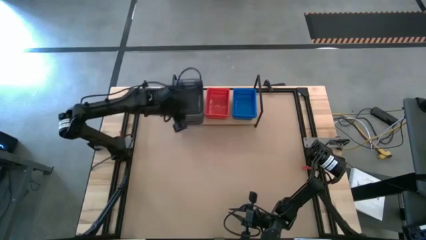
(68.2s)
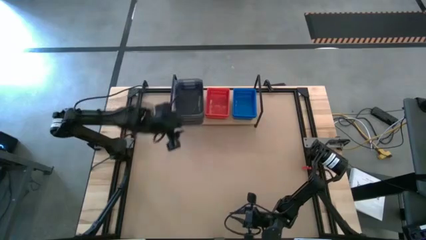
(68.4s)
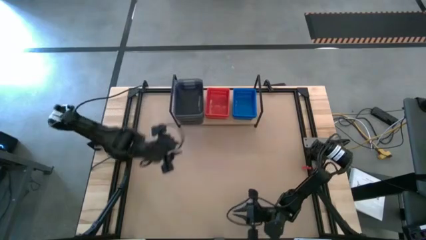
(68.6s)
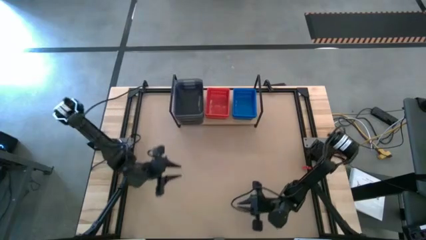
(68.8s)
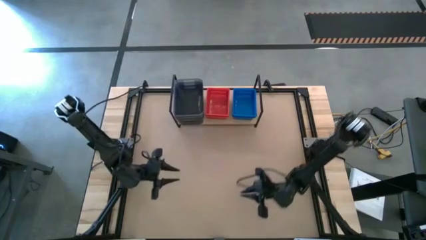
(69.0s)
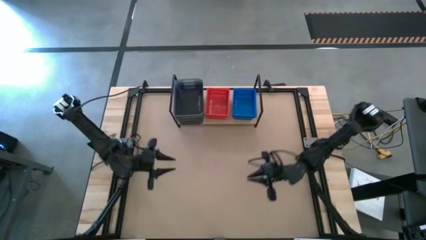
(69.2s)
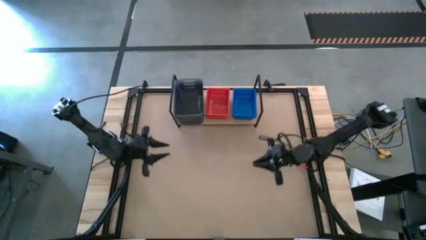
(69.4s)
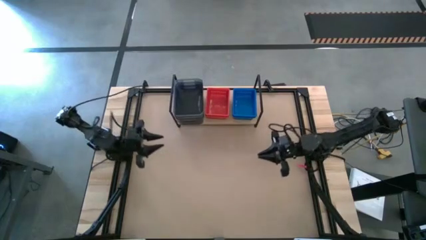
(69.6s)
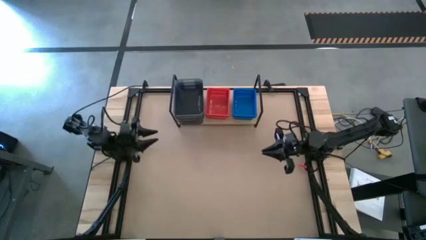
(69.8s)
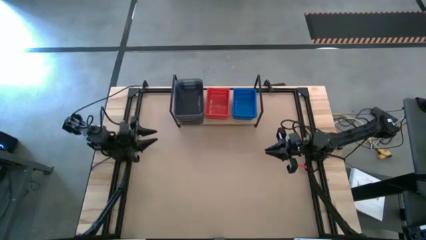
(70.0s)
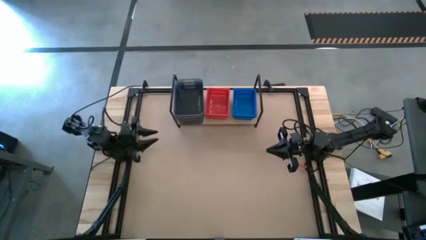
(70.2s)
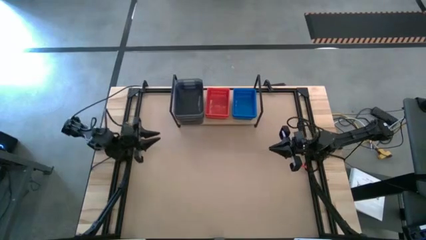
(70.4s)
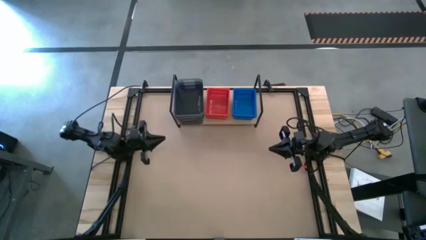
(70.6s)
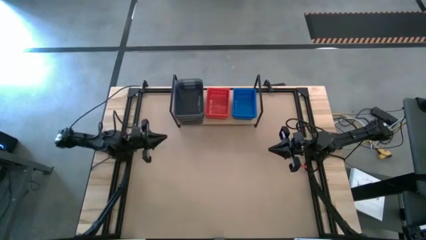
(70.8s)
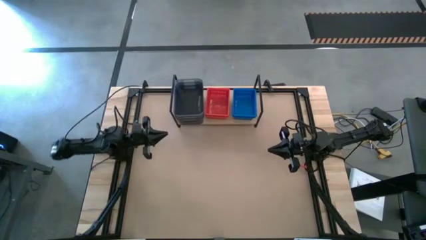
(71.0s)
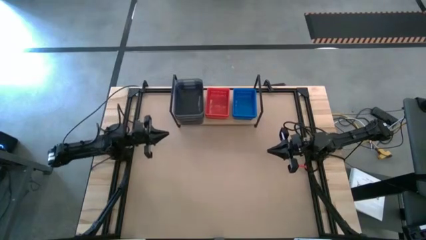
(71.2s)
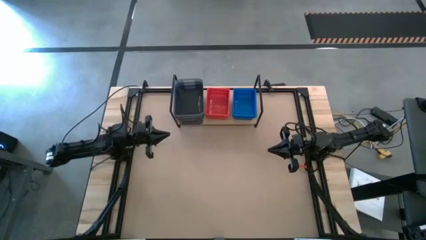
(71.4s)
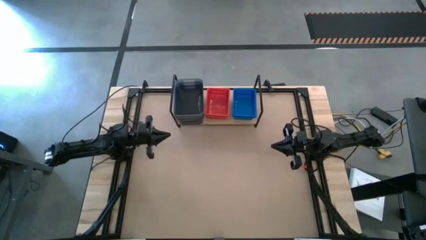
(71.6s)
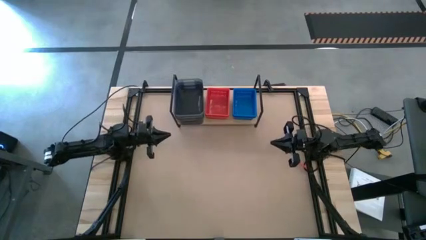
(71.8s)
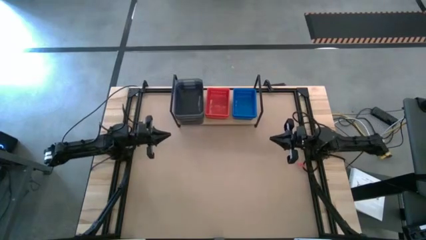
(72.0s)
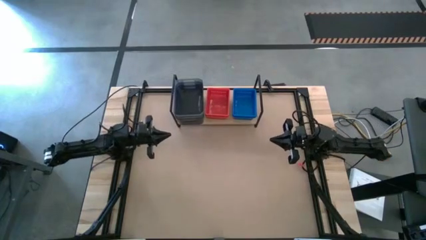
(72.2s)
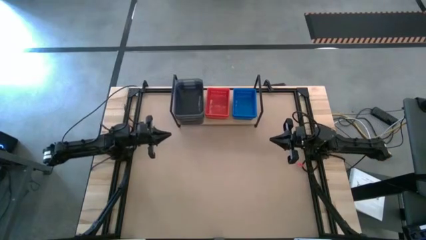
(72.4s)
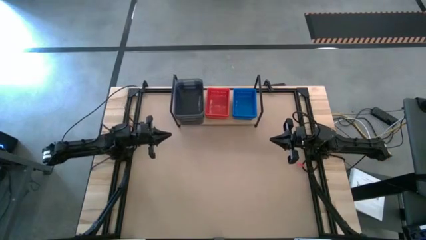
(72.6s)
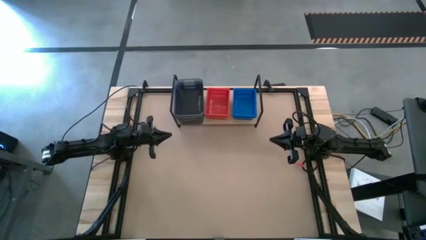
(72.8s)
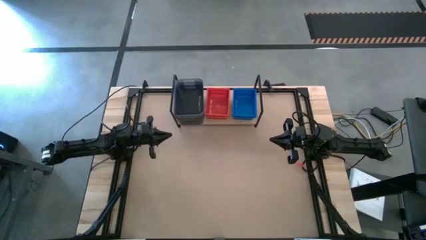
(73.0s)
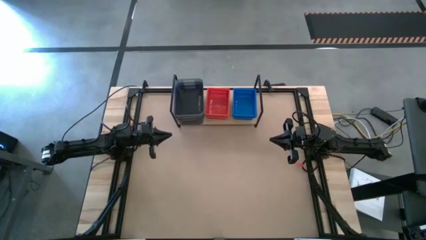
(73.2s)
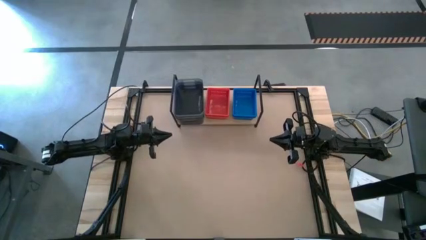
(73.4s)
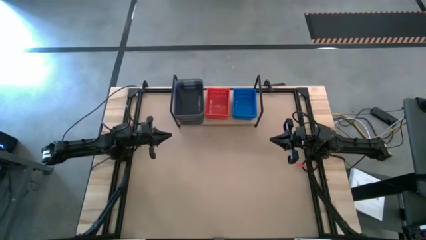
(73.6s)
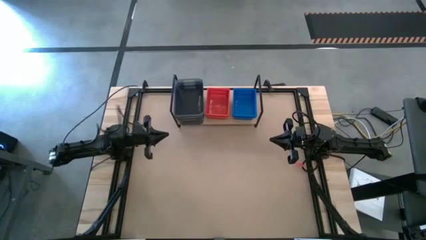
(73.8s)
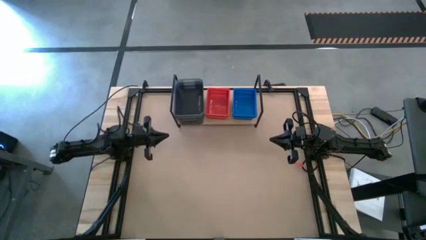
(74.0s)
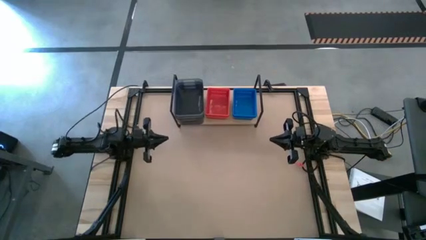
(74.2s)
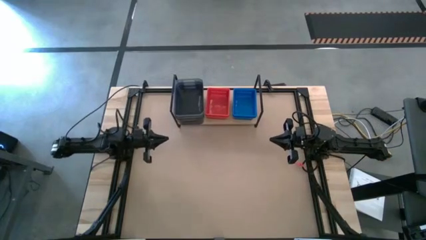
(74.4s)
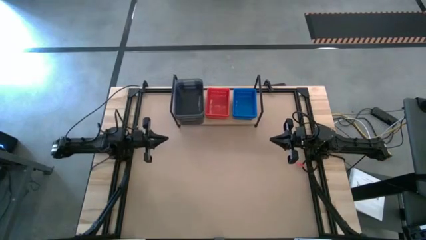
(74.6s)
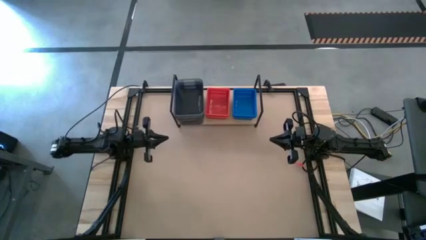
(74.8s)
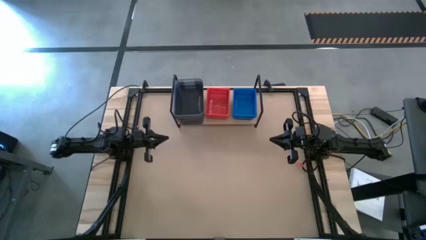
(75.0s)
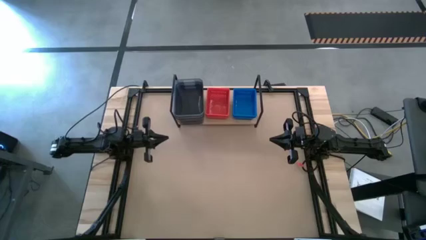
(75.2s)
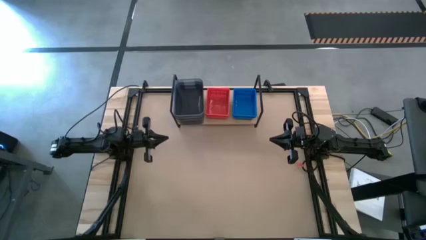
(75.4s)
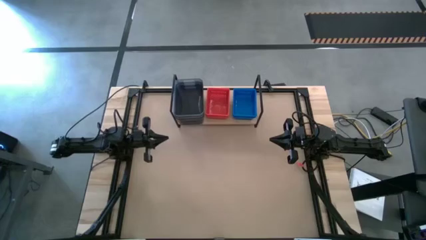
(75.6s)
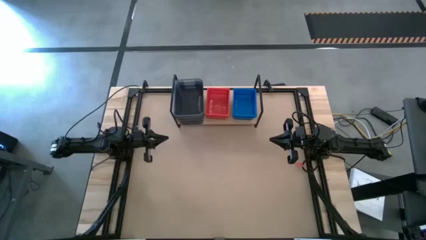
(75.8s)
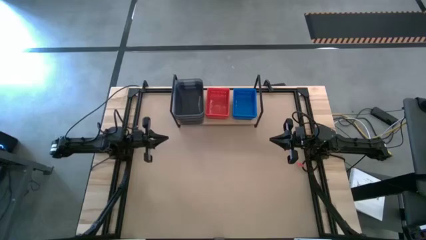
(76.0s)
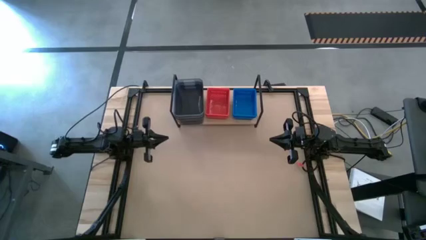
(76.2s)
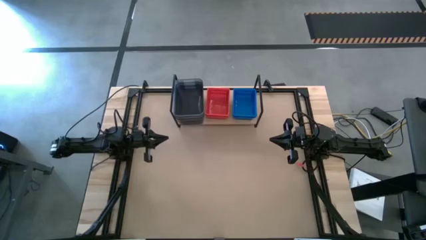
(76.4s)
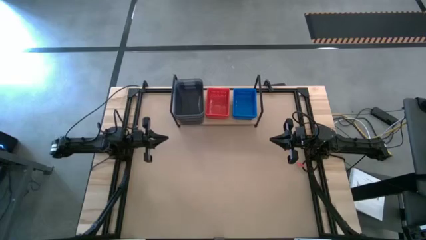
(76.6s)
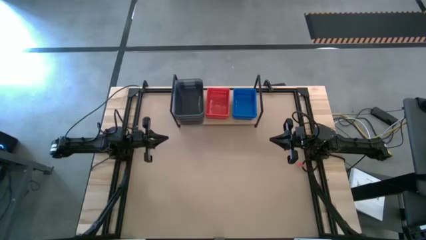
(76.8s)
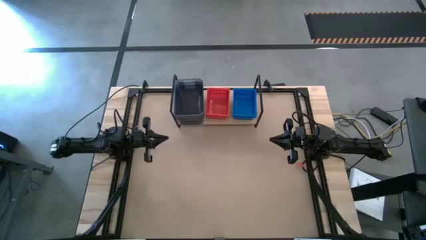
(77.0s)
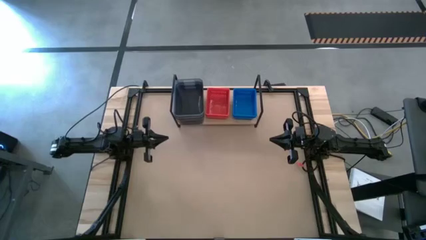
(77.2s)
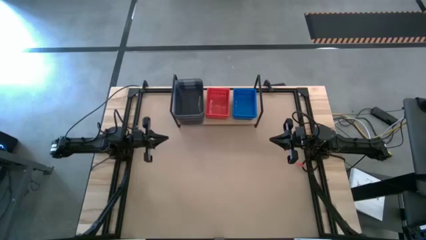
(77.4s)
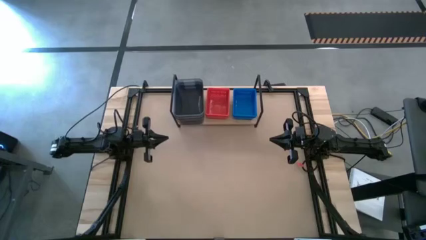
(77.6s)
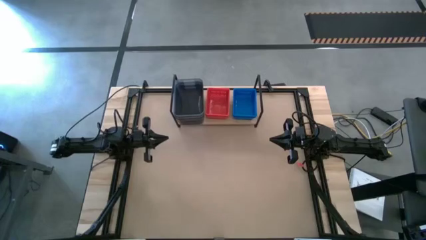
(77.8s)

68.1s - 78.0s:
Task: Stack baskets on shelf by color
Return to Home Position

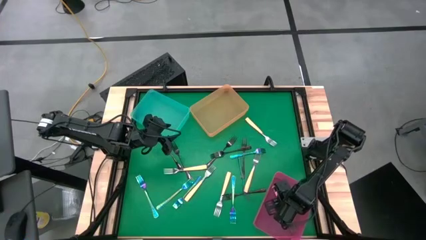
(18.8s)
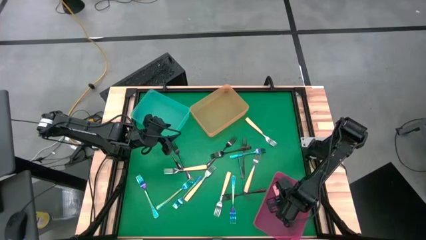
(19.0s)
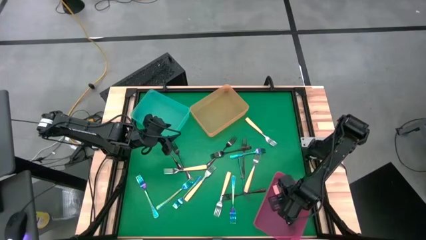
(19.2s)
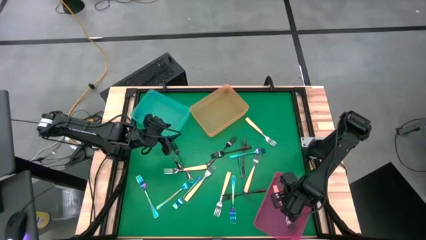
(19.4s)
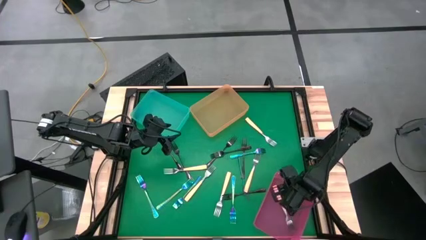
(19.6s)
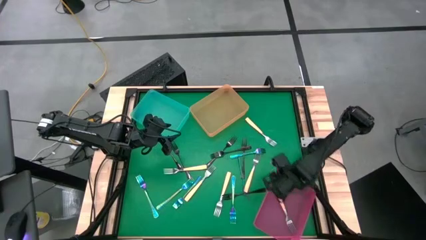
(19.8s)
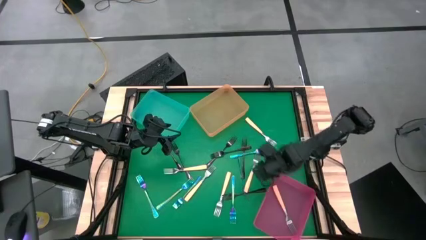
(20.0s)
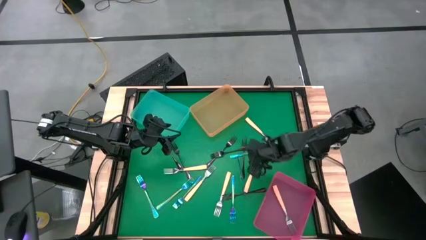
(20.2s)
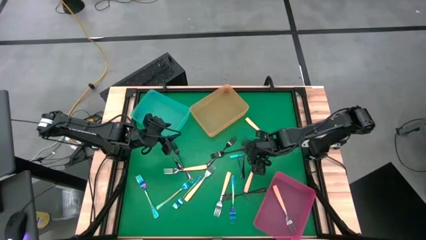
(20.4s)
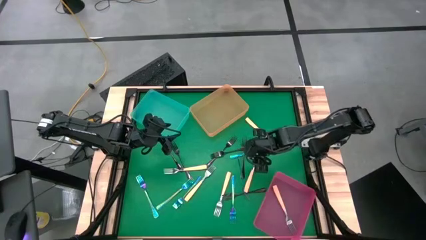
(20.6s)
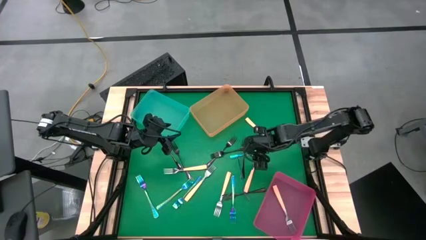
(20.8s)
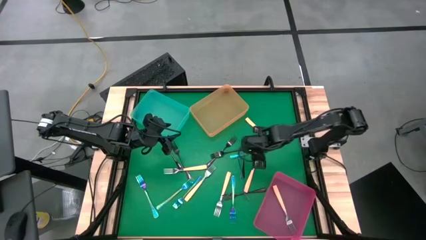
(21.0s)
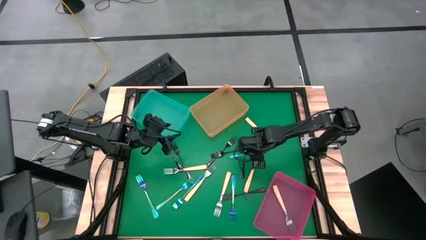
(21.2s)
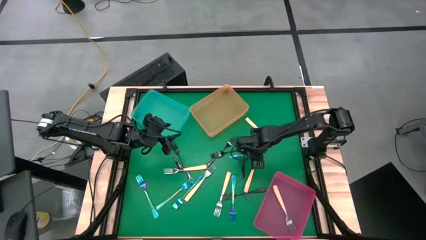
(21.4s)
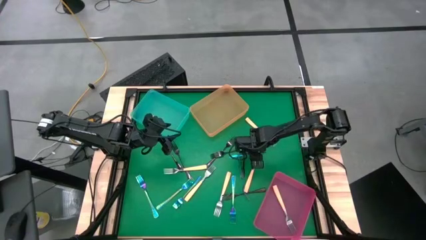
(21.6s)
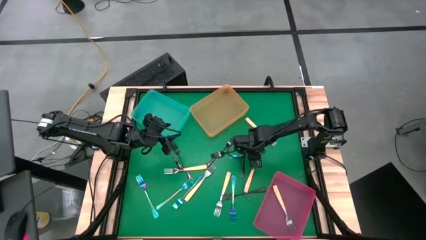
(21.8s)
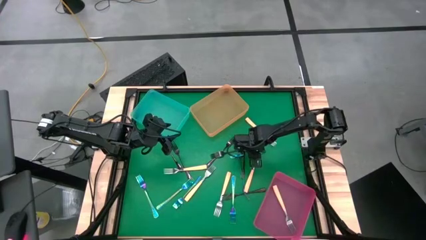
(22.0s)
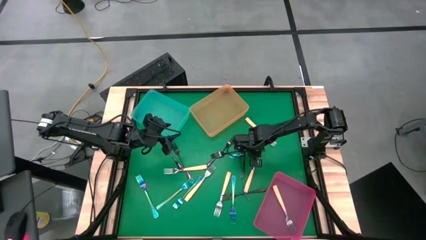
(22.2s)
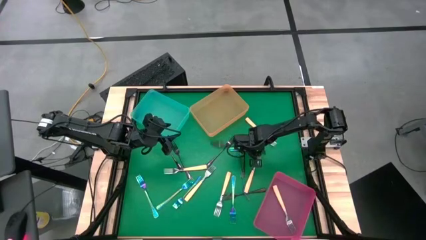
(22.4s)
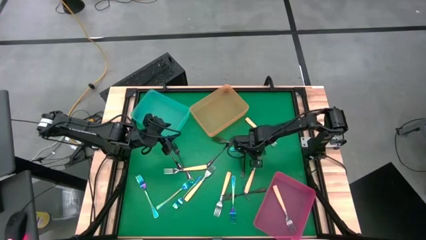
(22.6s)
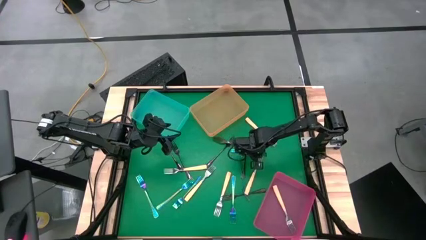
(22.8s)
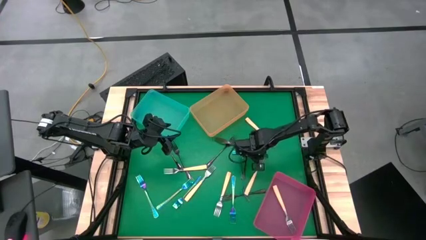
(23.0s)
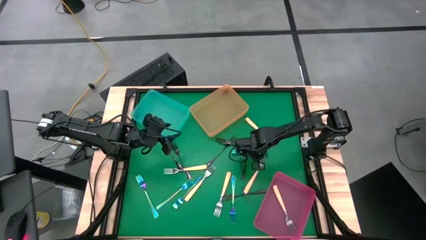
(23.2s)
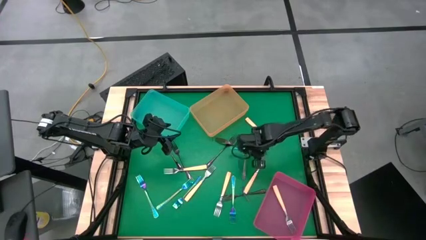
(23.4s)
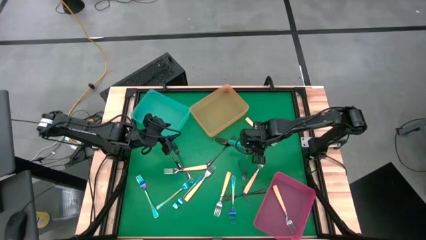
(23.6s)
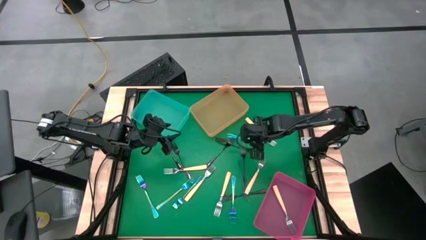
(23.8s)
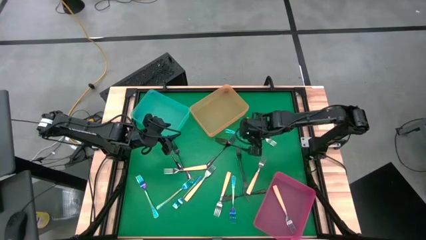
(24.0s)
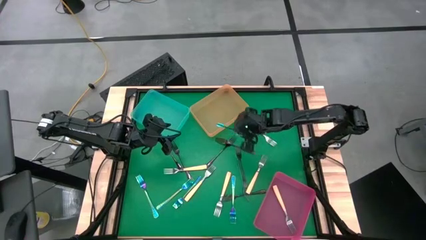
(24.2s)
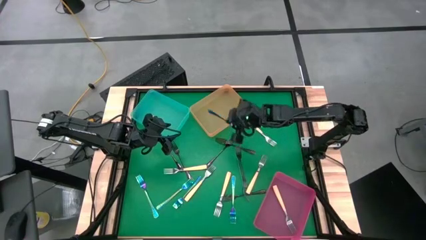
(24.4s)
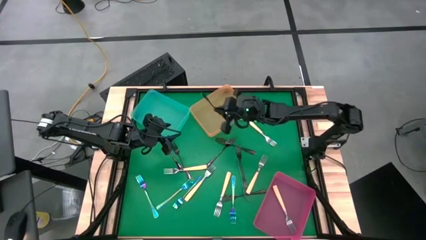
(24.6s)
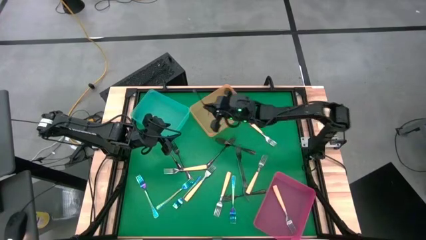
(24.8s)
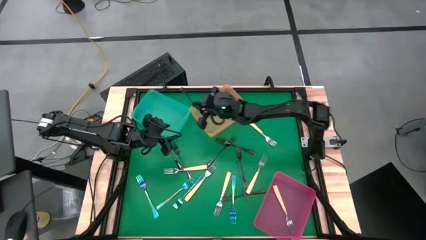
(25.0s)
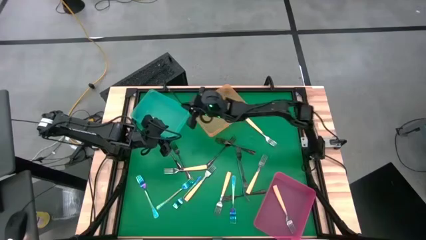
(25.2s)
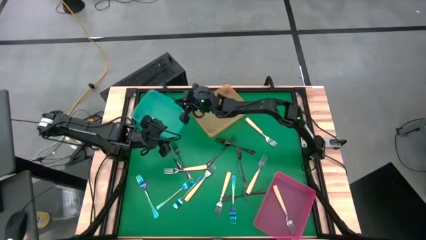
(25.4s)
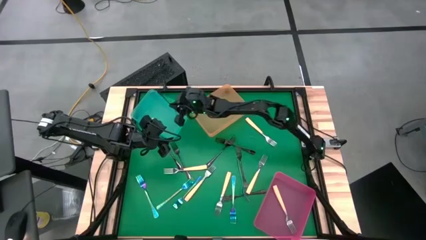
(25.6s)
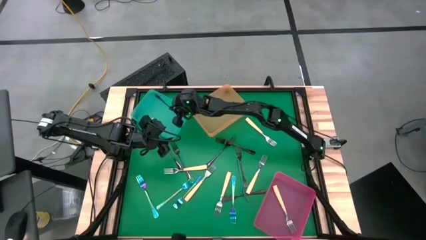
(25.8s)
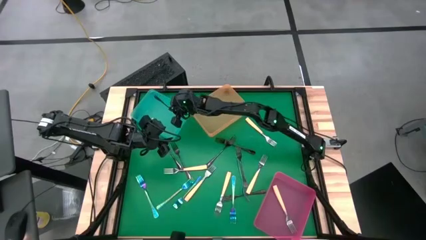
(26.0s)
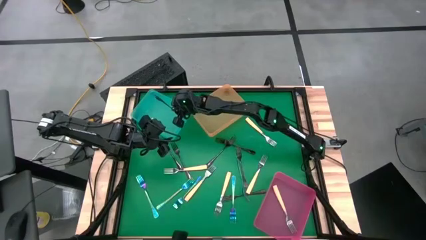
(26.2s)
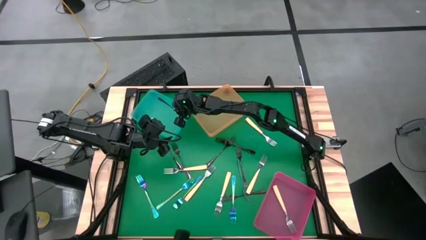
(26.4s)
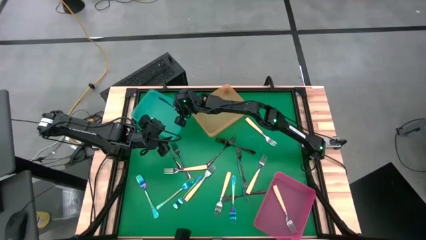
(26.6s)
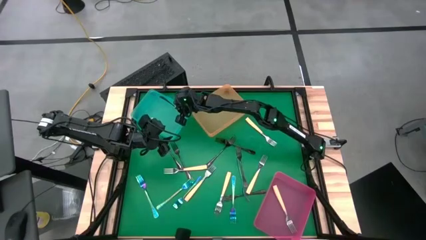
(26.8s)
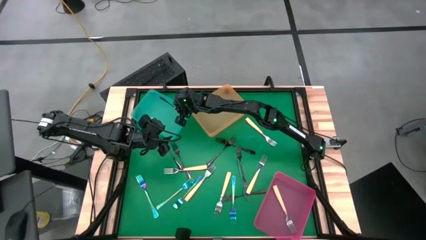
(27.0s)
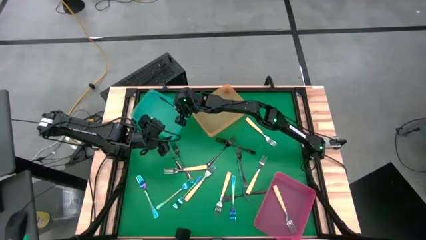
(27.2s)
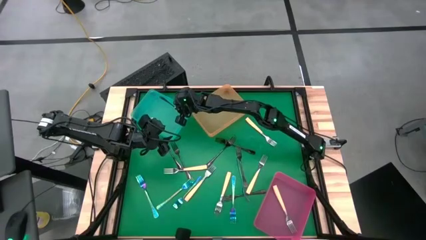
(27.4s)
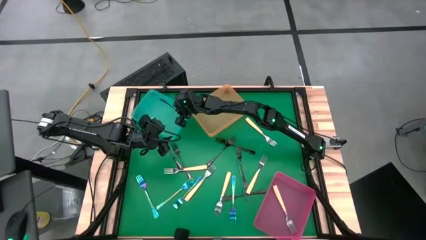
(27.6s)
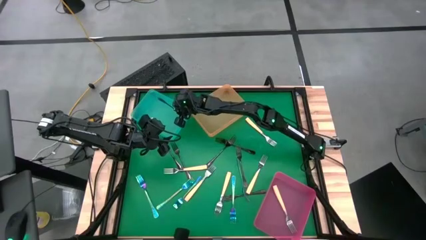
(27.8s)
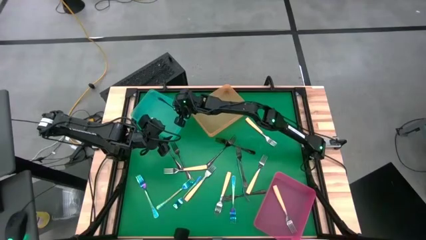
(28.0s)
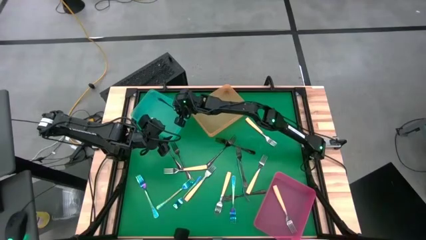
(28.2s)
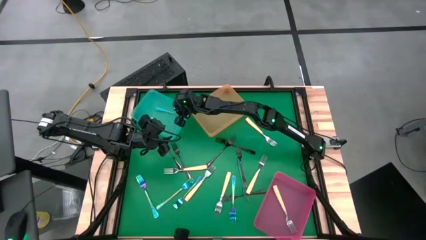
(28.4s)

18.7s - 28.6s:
Task: Sort silverware by color (type)
Put the blue fork into the blue bin
